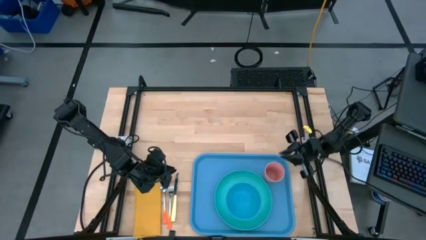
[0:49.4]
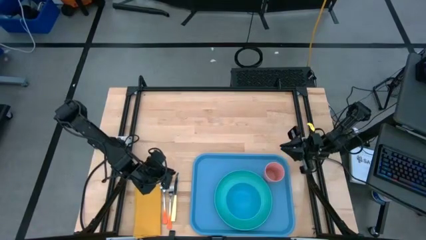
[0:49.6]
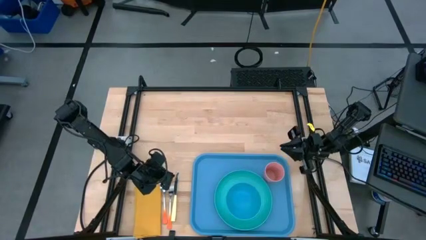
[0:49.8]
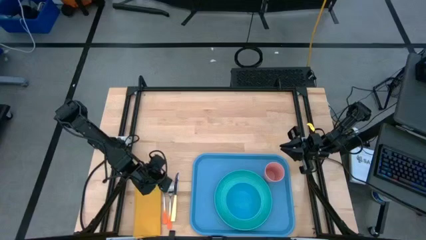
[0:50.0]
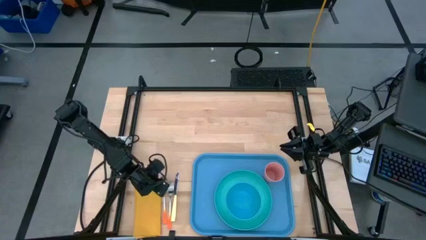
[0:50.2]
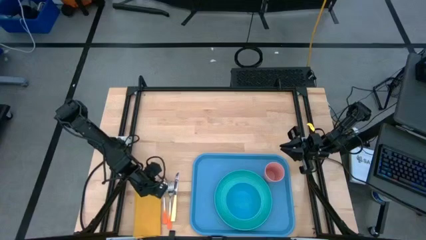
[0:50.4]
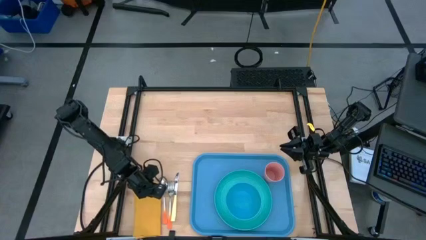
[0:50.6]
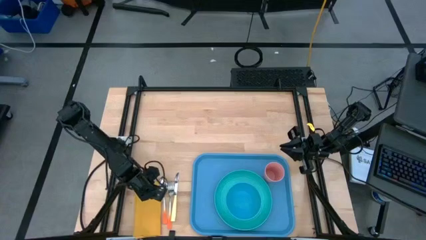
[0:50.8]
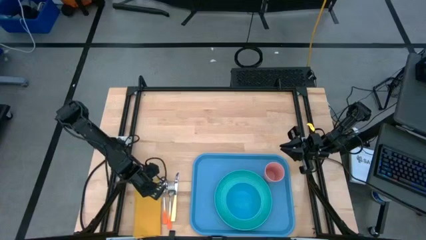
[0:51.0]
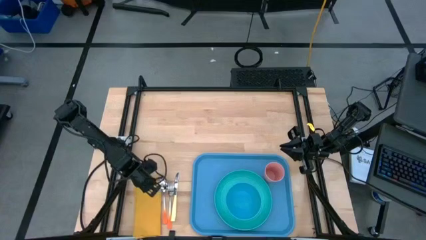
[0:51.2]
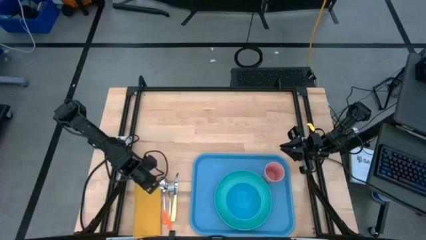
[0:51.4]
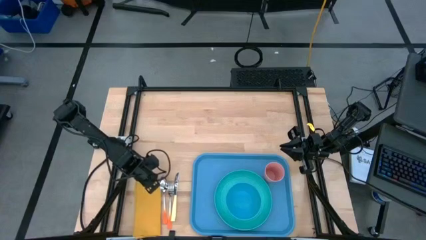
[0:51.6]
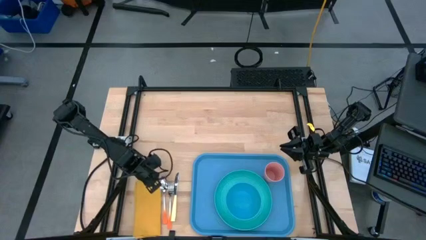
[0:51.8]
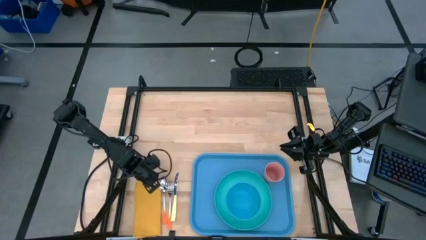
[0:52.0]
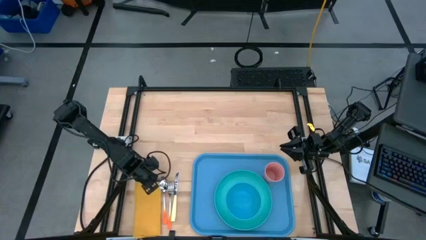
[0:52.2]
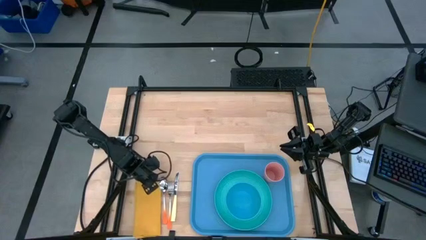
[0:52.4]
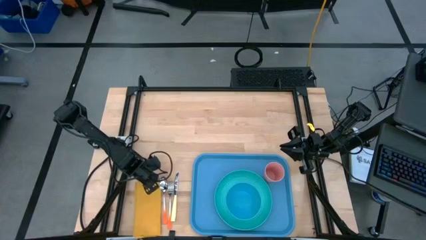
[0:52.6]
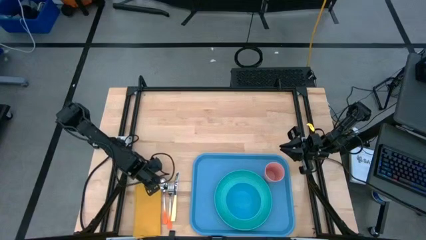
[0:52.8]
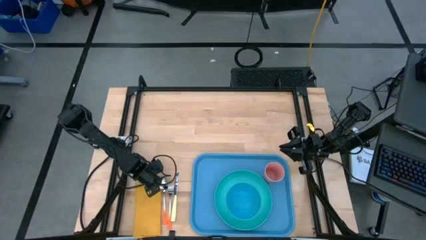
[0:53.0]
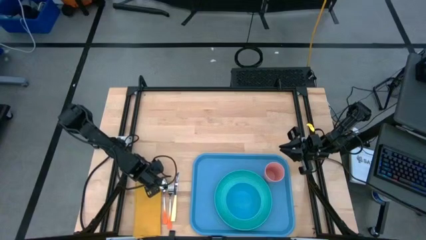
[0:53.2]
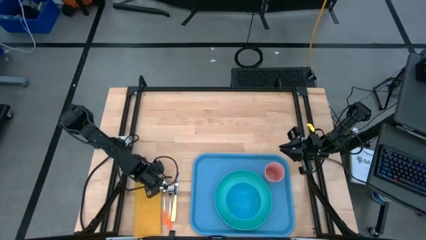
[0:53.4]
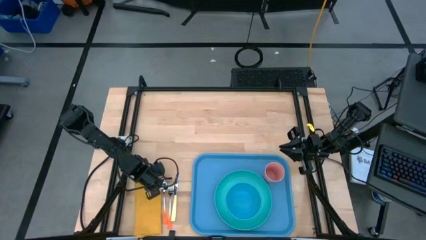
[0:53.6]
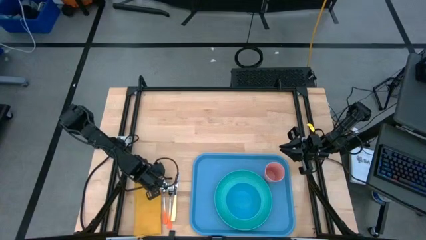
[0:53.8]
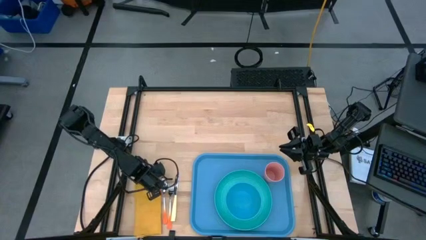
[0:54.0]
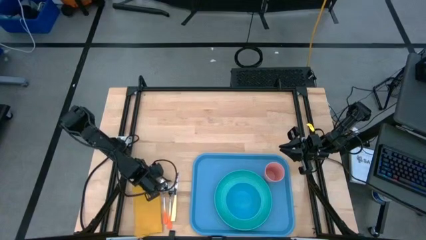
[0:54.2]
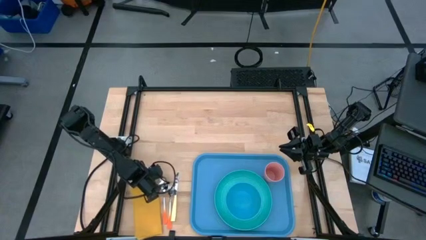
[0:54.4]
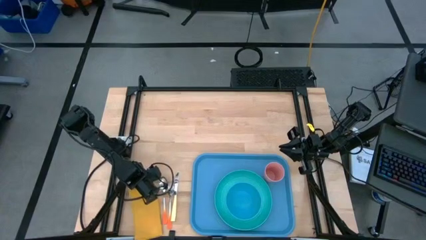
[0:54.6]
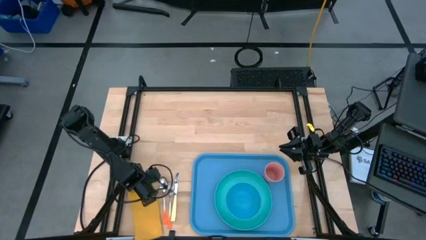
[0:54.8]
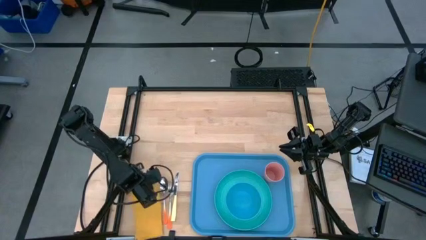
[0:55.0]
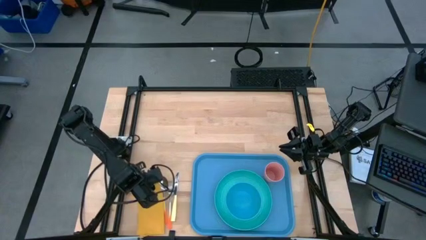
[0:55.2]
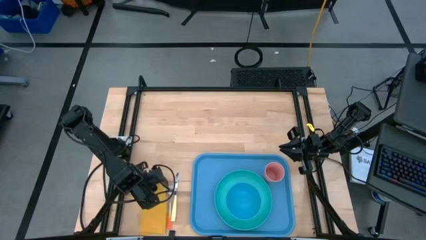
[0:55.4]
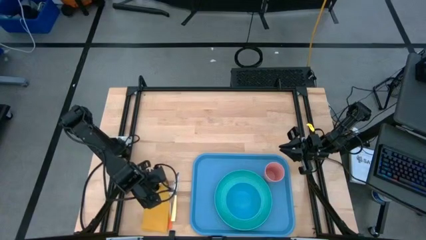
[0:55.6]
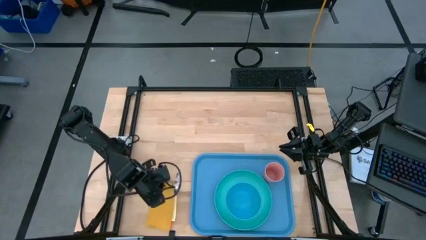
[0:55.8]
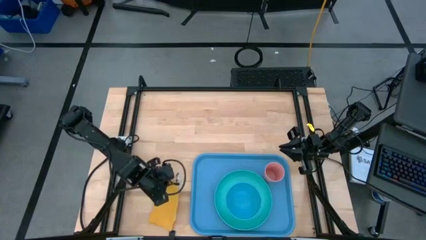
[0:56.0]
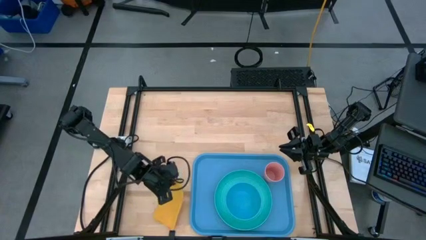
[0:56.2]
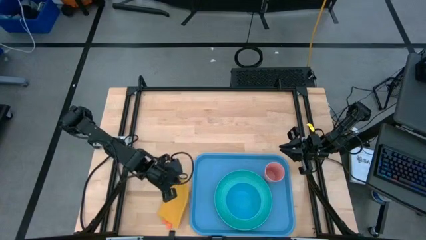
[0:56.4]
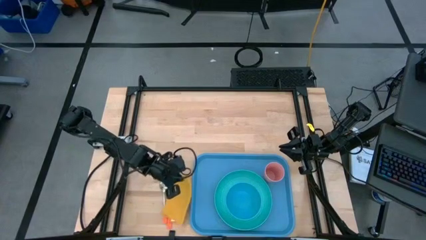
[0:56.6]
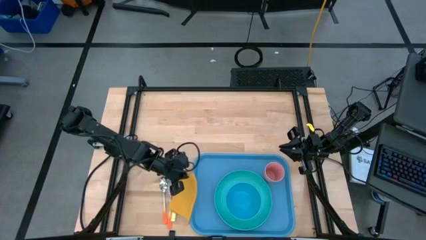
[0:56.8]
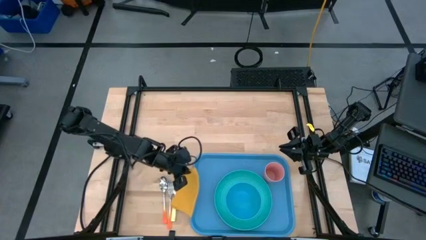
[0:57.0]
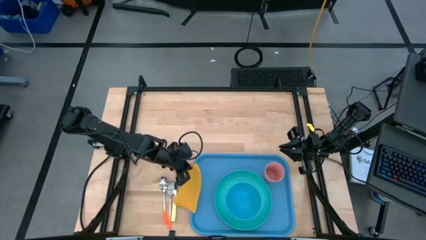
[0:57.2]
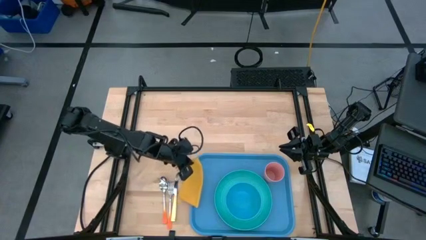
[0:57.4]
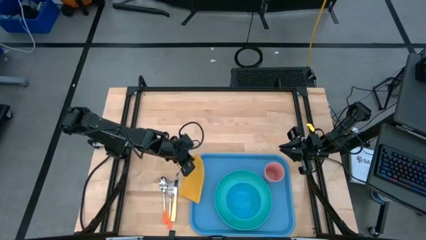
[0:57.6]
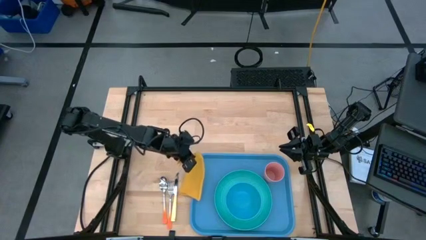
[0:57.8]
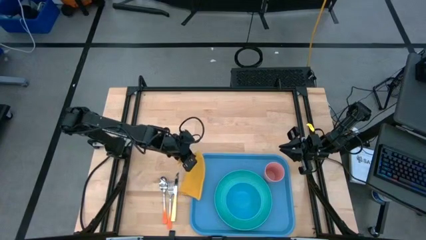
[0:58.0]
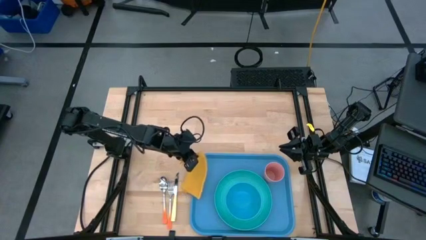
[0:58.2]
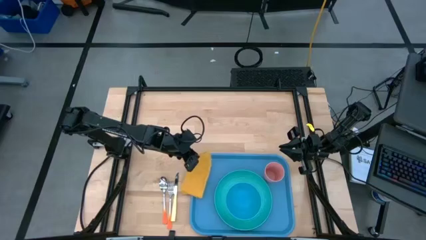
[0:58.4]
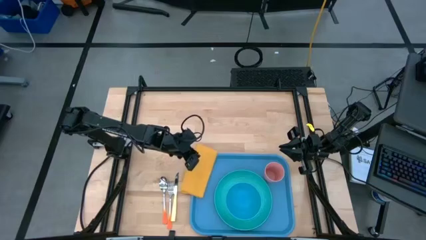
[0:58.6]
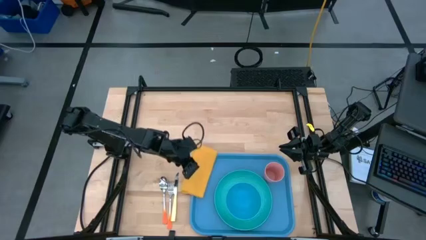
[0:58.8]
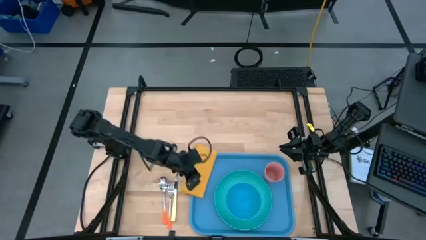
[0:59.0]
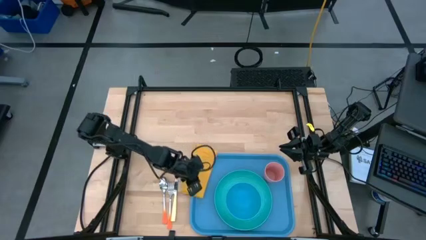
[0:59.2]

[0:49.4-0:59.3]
Task: Set up tray
Put the yellow napkin on the blue serving tray to the left of the light blue plate

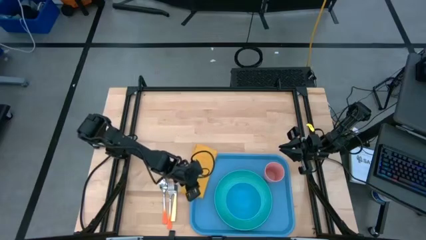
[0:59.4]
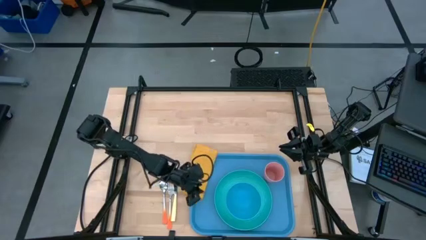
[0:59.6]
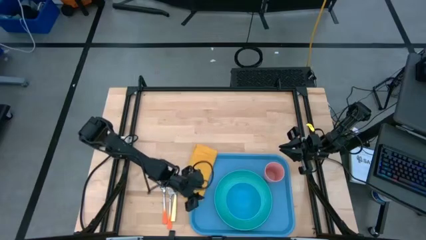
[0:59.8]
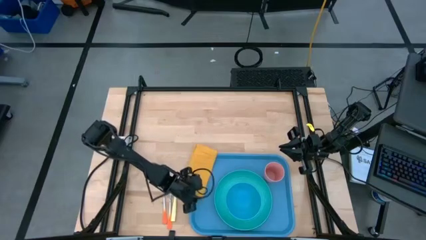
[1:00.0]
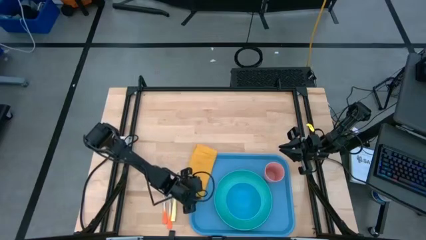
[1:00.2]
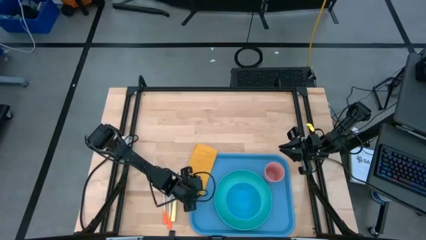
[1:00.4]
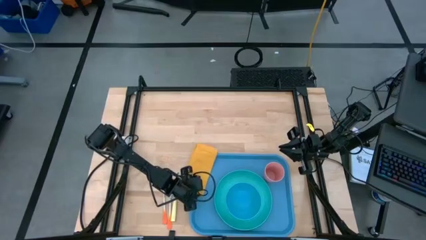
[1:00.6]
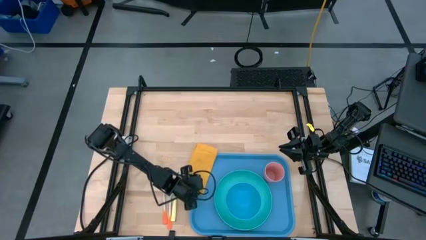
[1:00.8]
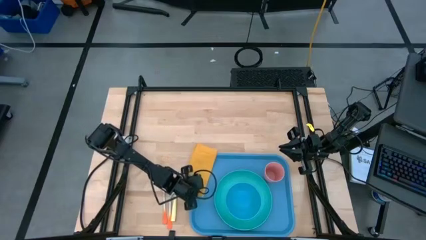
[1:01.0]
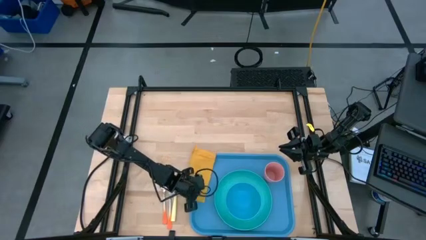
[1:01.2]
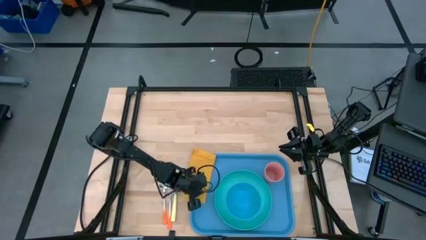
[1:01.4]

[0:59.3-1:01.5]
Put the yellow table napkin on the blue serving tray to the left of the light blue plate

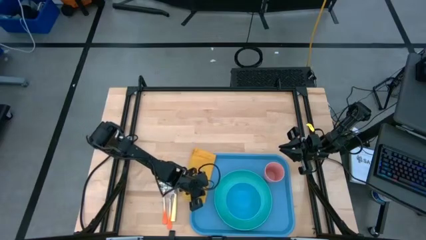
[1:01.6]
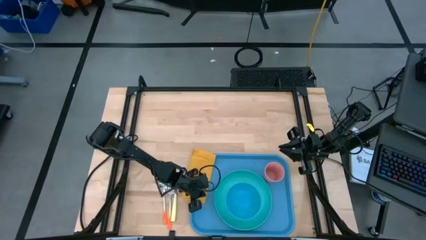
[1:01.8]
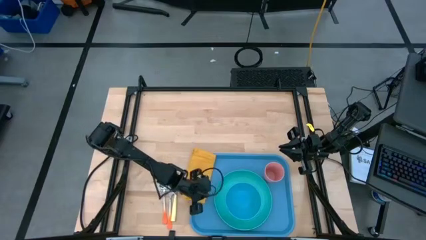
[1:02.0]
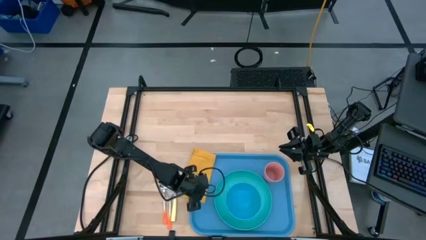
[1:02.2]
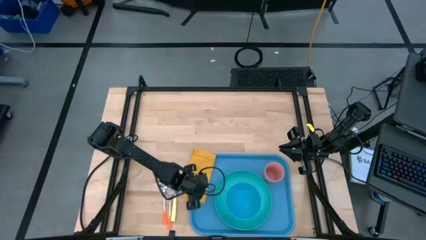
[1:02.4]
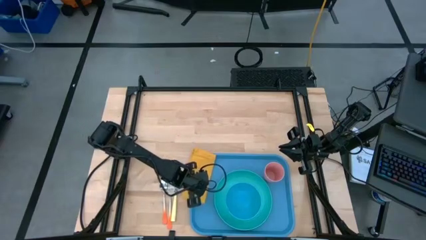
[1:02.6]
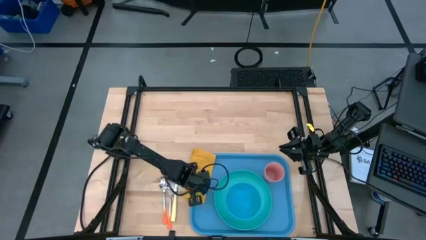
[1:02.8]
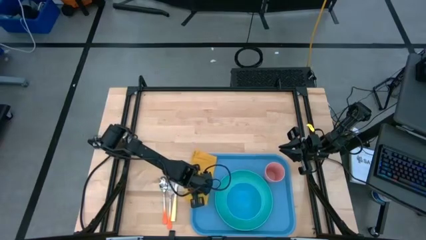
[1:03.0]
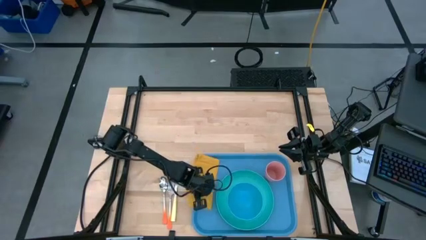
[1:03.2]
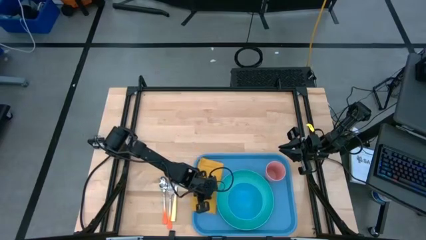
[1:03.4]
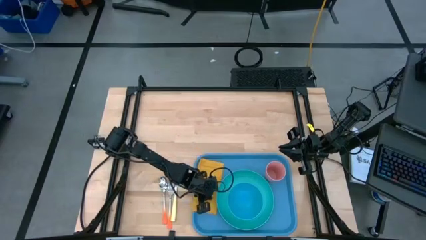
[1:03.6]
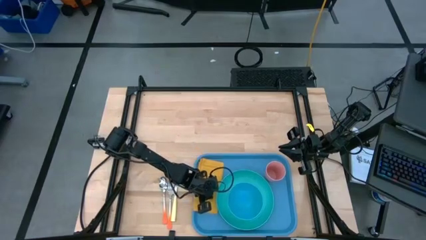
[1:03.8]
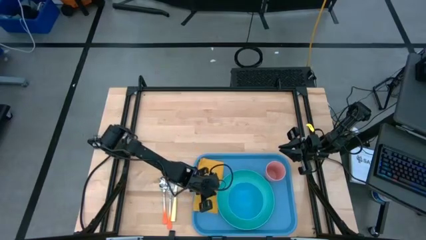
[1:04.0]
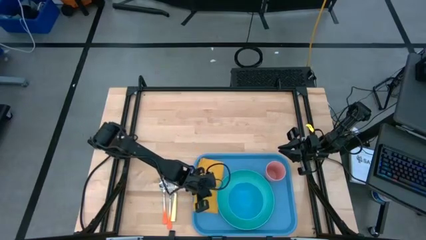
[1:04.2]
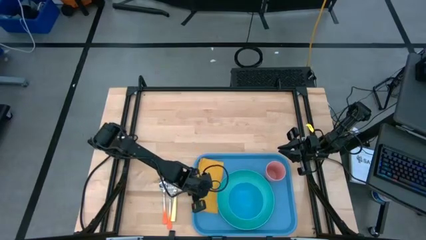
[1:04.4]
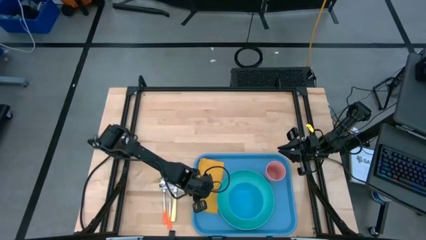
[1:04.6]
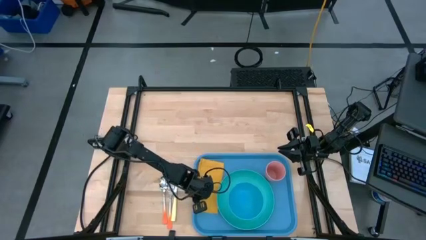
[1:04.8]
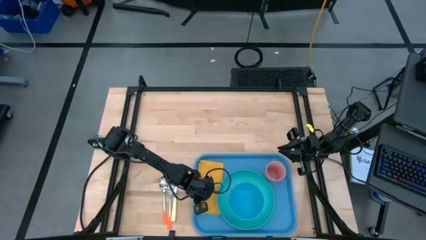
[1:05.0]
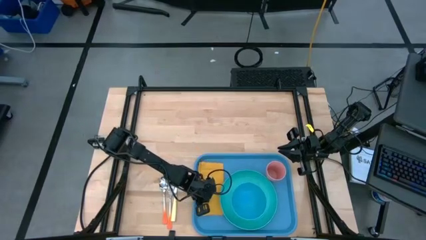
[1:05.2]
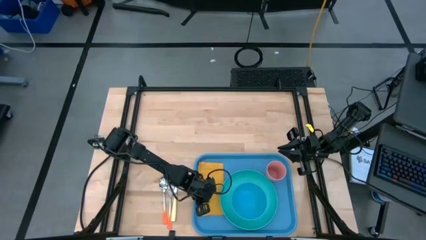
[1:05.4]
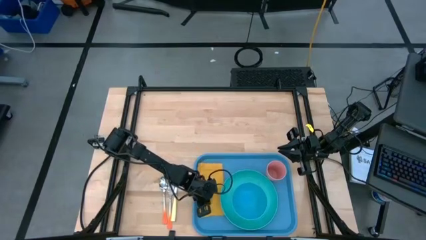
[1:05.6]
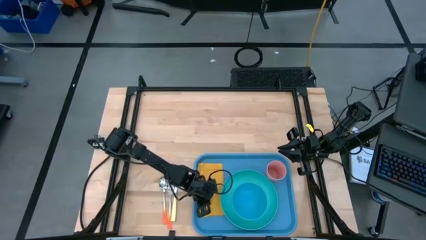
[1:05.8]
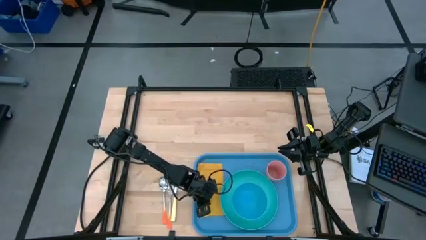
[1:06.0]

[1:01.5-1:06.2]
Put the yellow table napkin on the blue serving tray to the left of the light blue plate
